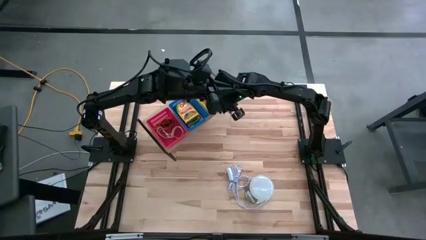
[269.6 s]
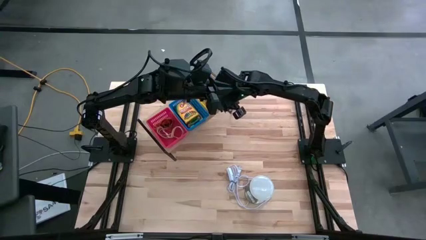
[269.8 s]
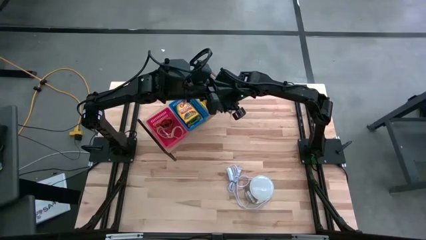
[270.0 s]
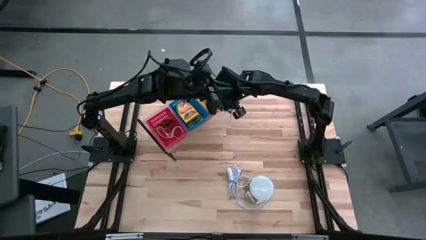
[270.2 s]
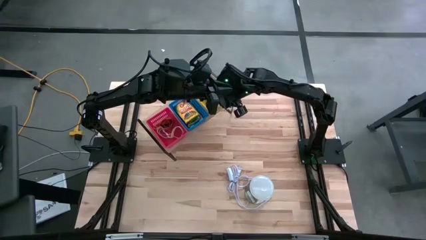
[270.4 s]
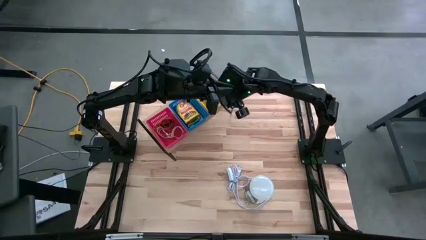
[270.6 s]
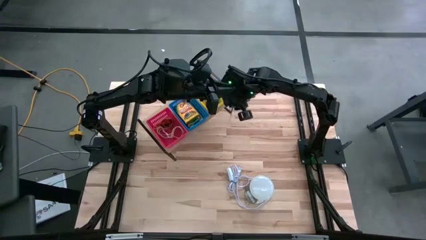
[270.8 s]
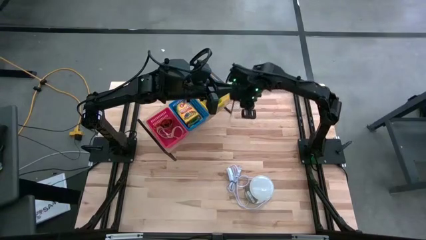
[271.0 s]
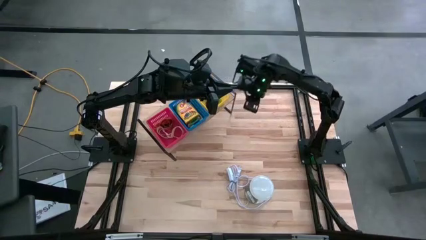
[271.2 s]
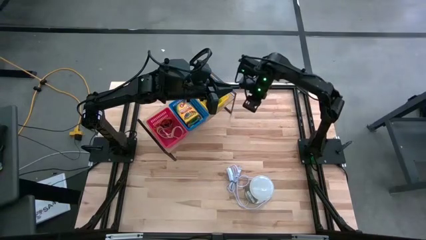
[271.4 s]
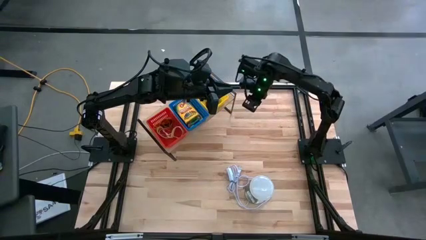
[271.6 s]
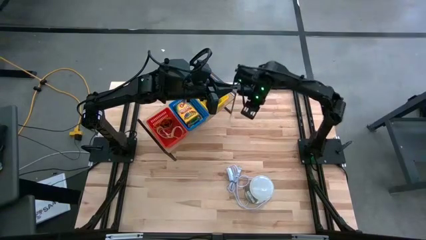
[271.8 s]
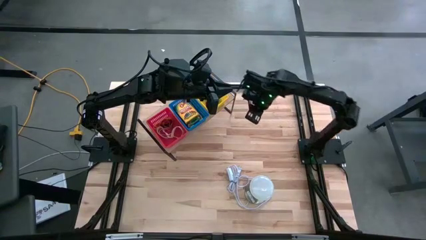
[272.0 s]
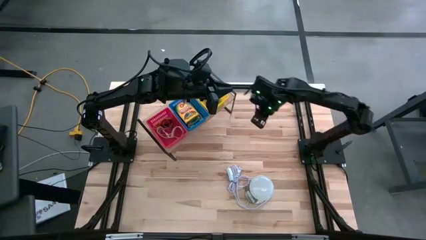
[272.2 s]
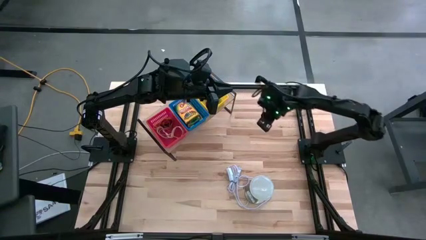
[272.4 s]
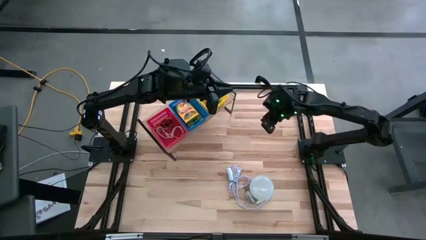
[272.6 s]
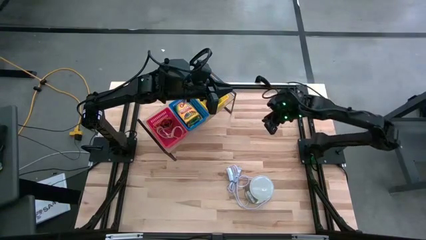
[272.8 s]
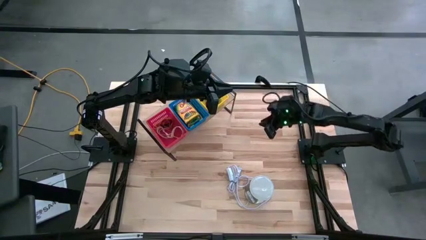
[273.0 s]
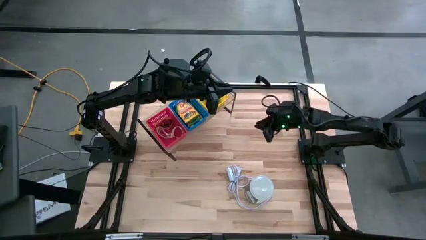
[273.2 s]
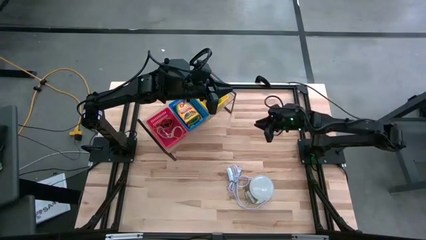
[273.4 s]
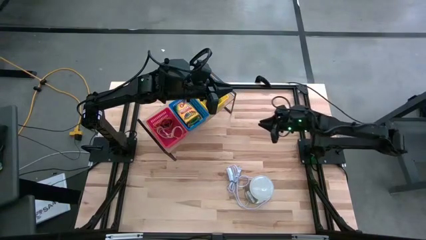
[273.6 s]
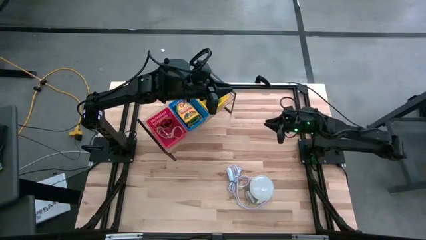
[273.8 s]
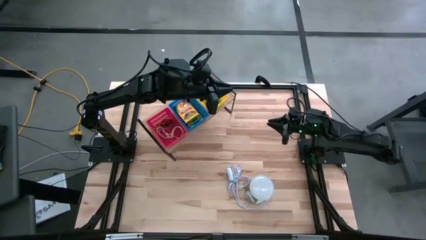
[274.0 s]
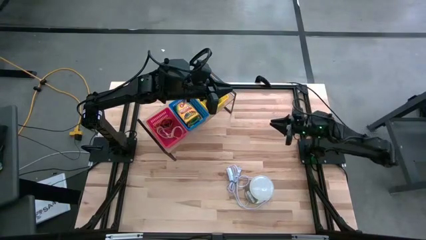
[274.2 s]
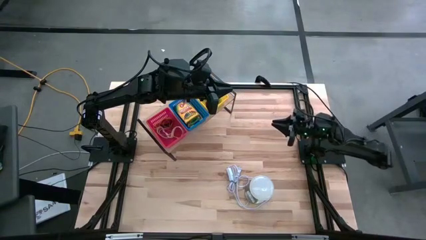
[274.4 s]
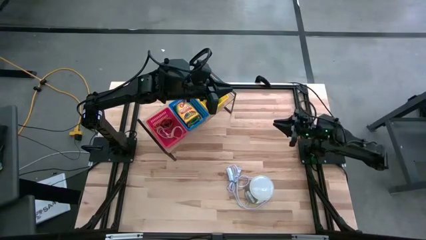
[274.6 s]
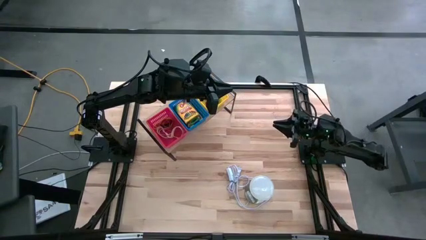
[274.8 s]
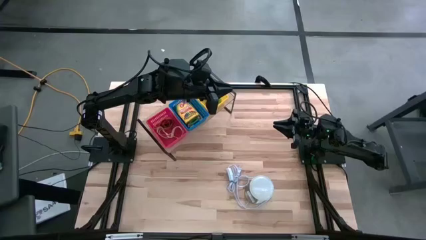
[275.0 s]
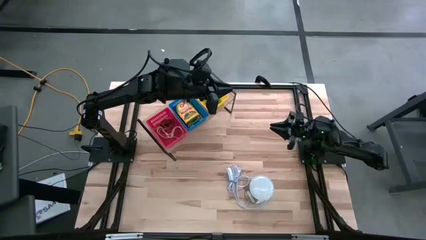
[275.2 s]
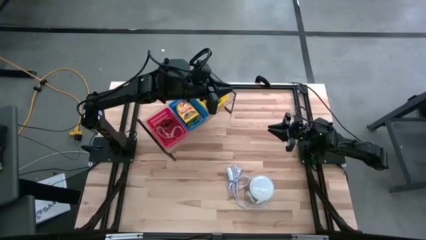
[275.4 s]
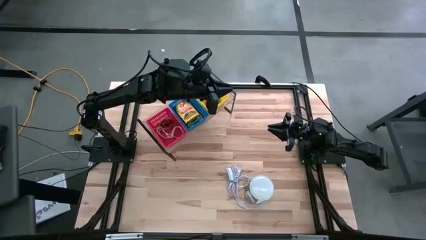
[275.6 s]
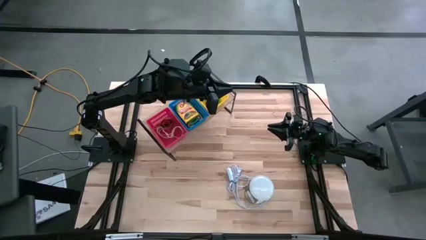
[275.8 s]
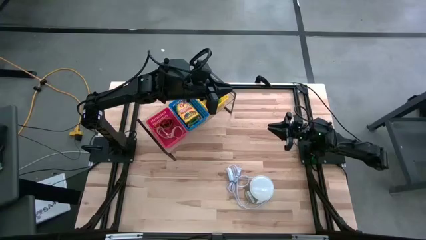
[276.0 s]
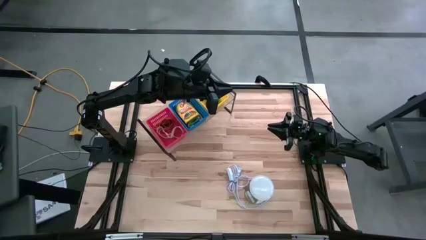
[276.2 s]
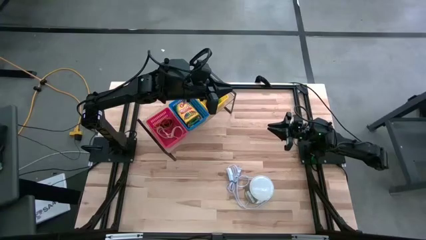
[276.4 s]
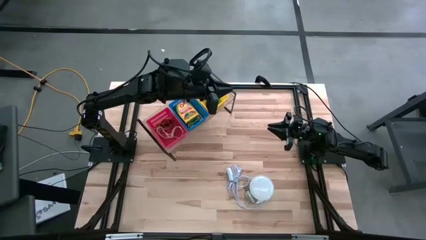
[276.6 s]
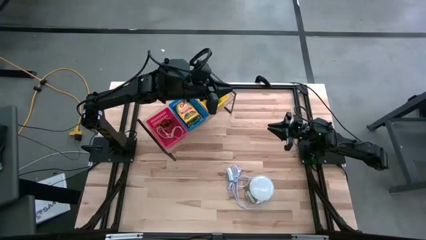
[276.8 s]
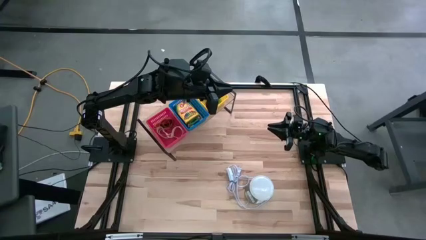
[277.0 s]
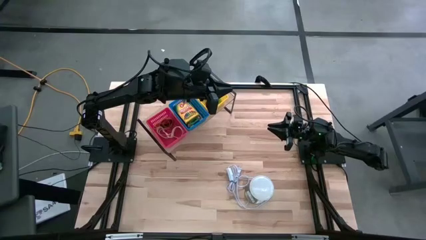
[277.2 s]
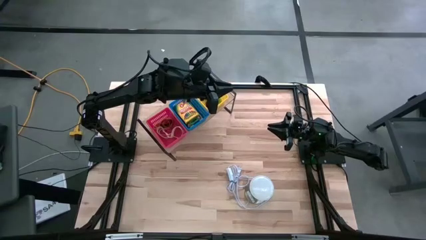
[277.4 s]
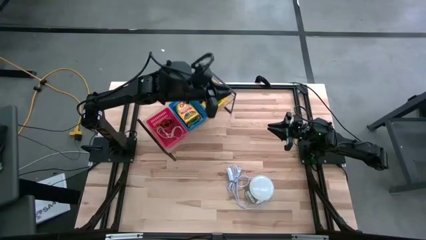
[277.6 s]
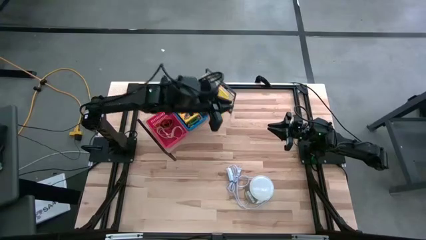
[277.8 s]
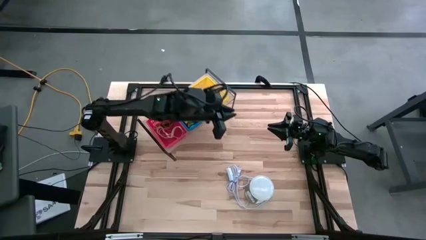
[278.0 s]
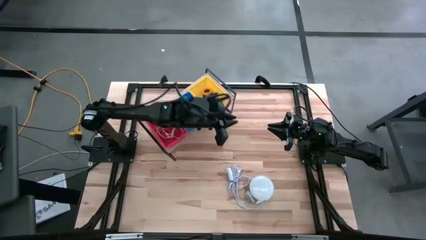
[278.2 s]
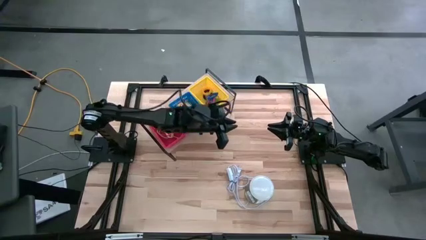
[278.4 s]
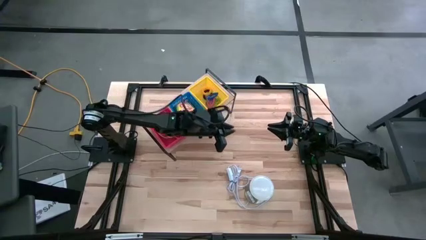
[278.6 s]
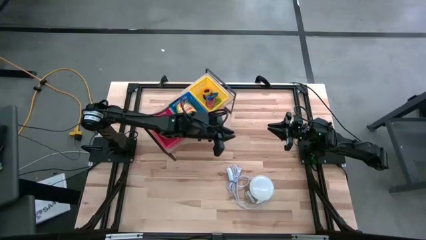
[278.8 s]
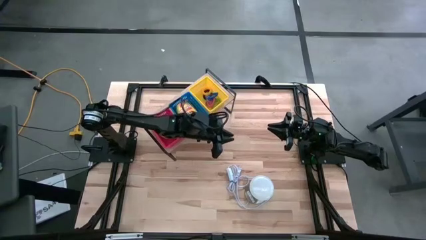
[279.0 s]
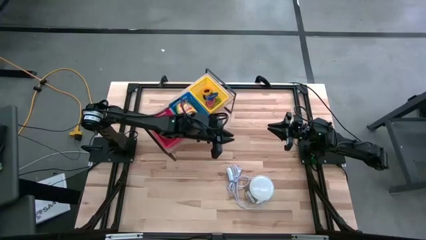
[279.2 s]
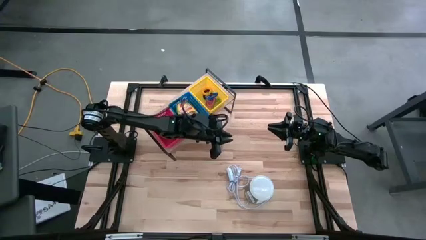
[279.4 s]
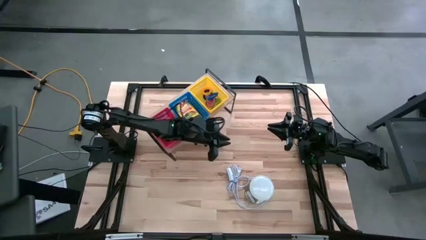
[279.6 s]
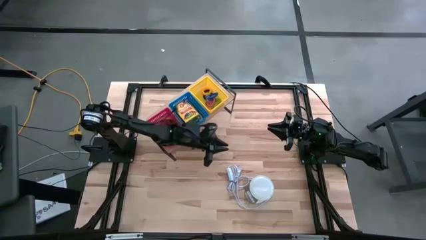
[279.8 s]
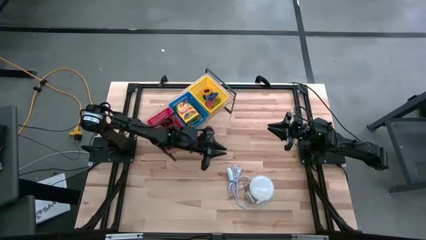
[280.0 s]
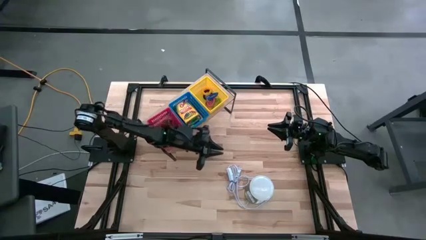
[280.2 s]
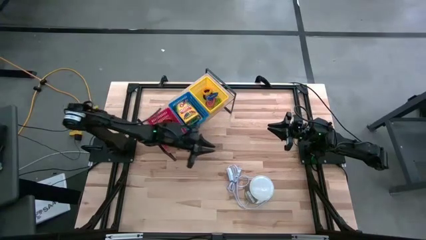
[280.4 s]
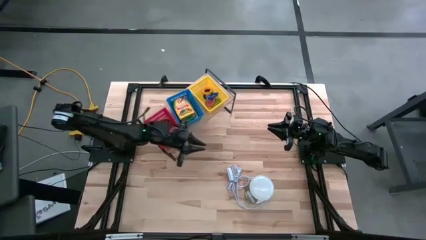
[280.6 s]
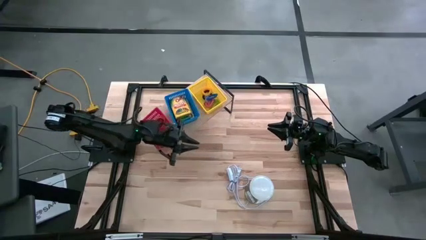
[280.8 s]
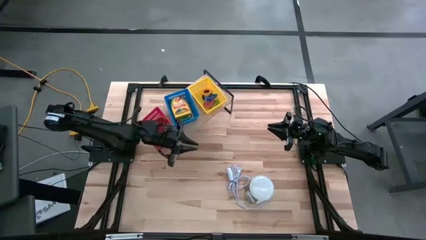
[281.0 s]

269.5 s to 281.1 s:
Task: Pick & Place Office Desk Supplies
Return to Home Position

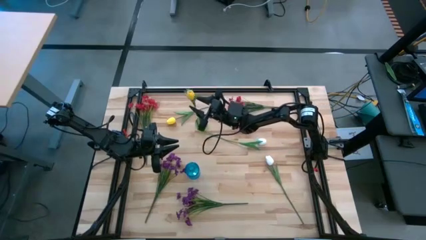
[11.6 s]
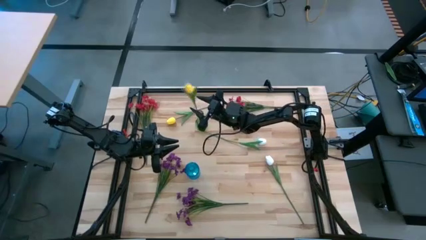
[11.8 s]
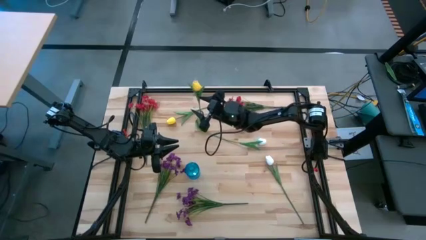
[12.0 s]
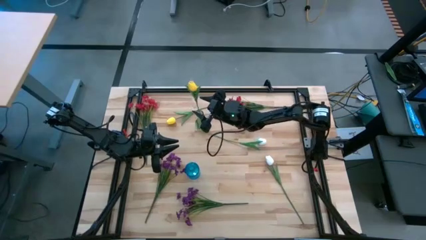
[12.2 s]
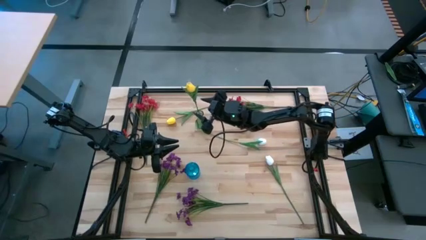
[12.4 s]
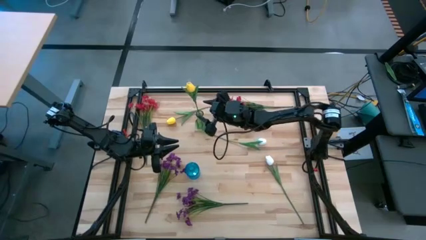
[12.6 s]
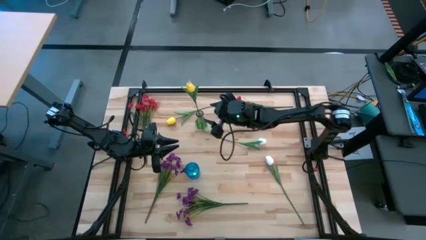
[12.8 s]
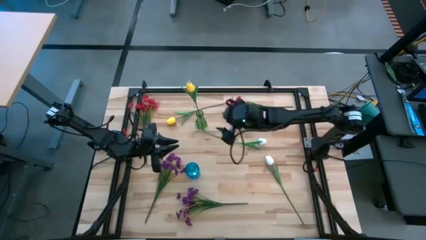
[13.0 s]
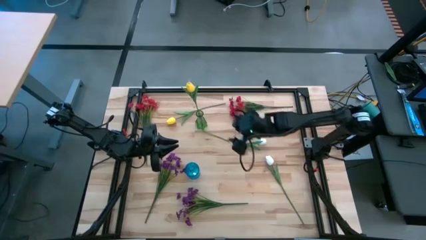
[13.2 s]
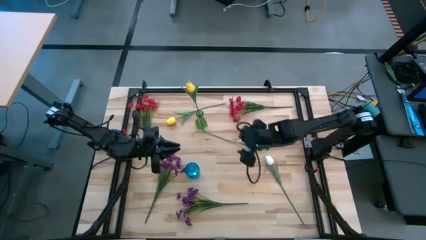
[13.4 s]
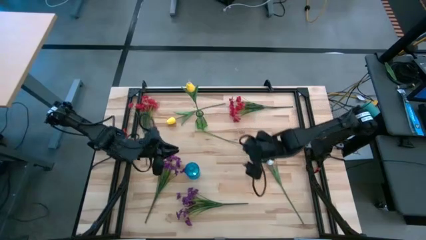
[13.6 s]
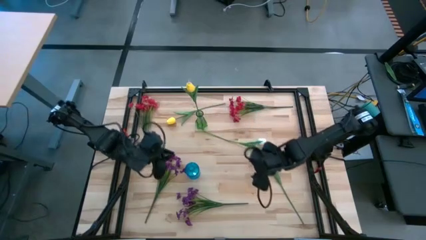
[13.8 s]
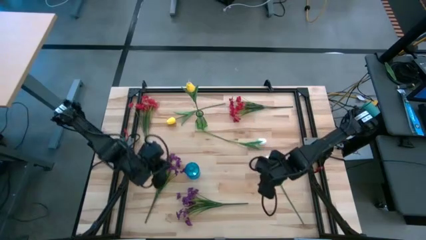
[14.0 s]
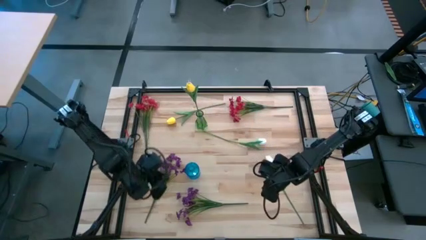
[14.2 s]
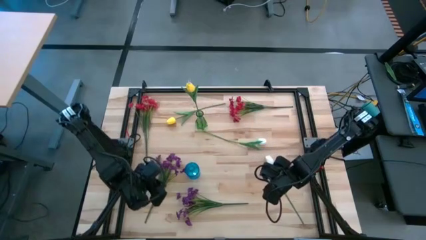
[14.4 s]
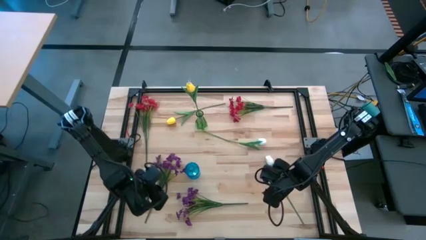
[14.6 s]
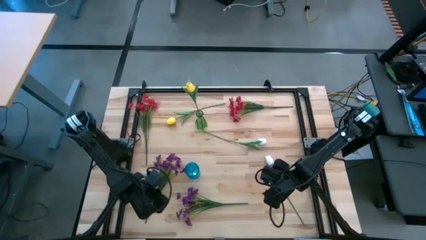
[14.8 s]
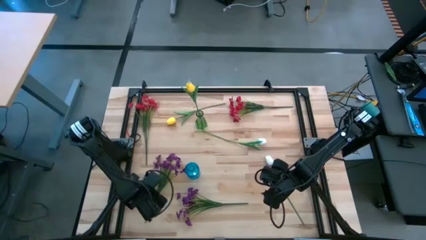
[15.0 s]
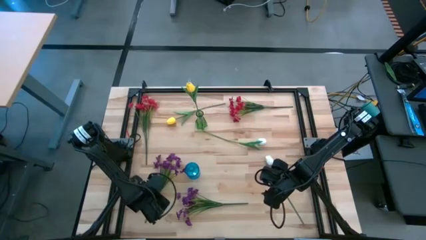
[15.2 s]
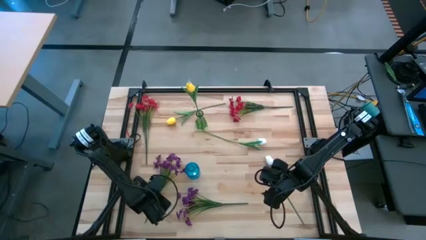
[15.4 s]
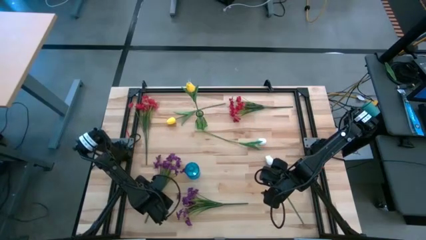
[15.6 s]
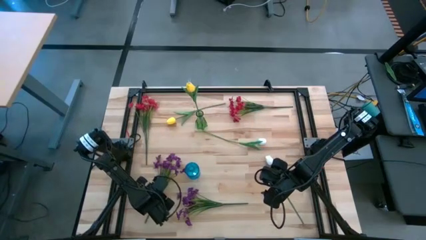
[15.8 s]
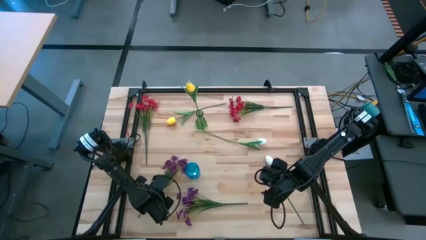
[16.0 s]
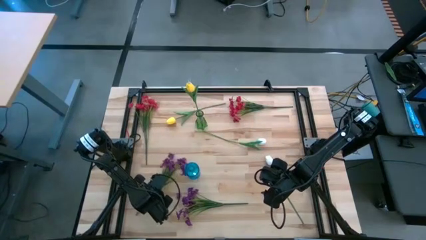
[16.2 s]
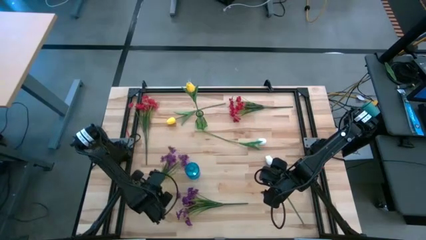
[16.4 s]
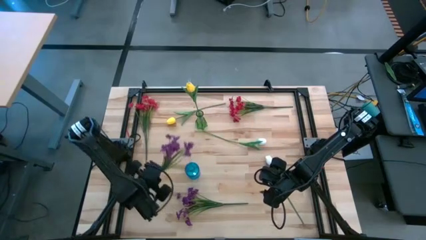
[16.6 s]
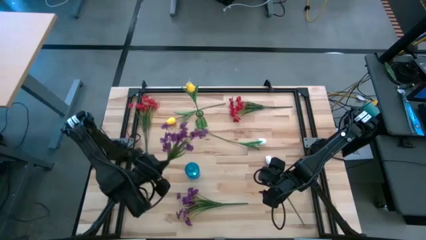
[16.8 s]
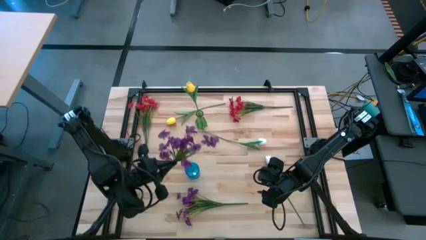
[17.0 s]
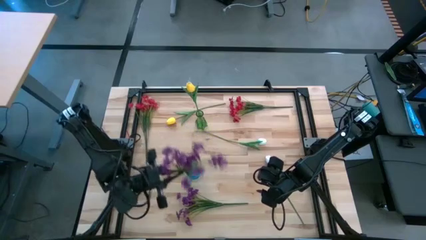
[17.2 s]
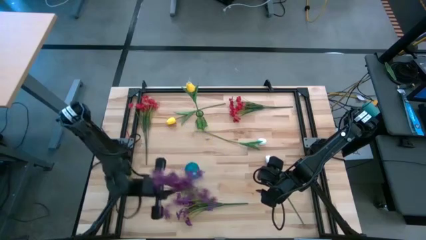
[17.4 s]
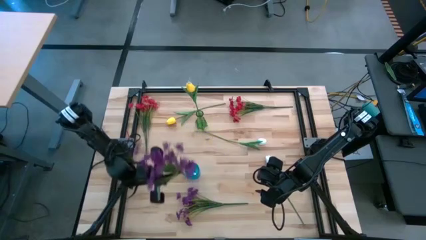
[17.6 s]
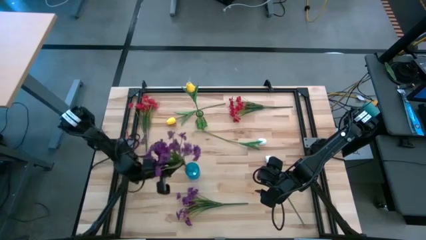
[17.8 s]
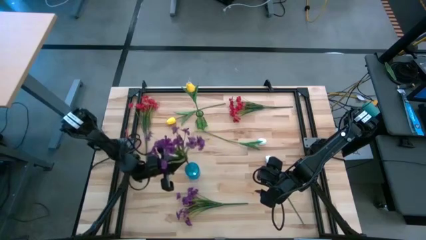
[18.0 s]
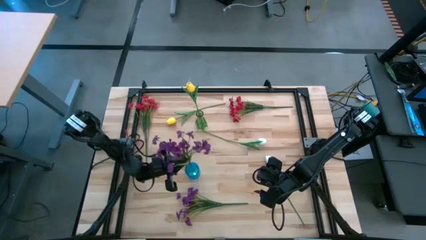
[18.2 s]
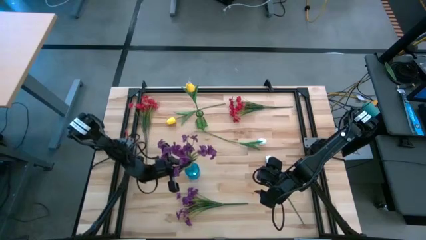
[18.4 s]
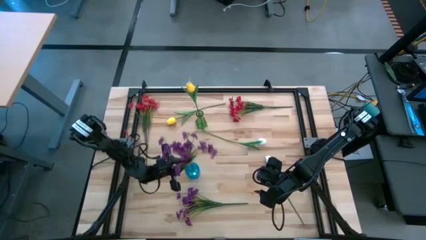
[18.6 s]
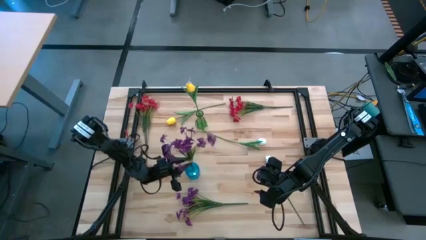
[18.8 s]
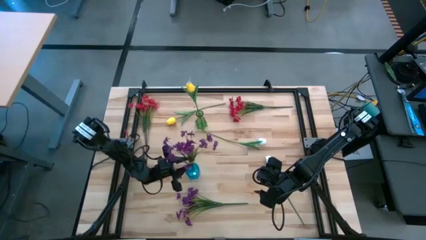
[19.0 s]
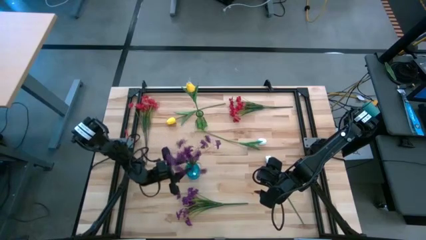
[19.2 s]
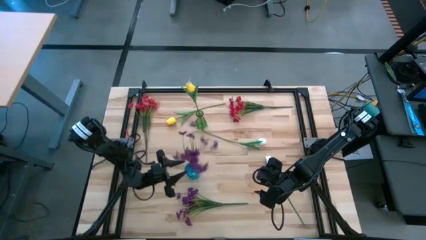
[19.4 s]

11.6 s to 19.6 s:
Task: Sort flowers into vase by color
Put the left purple flowers into the blue vase
